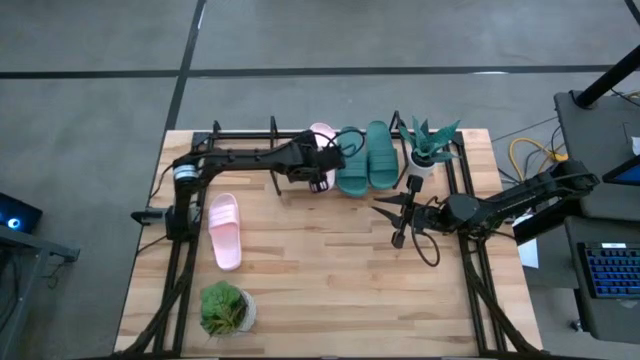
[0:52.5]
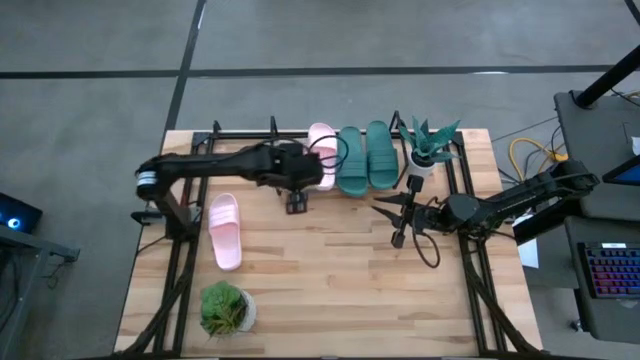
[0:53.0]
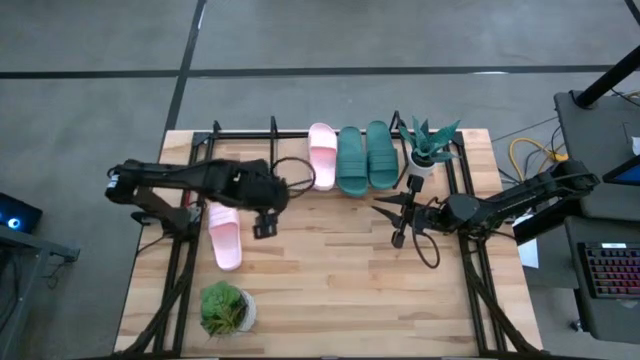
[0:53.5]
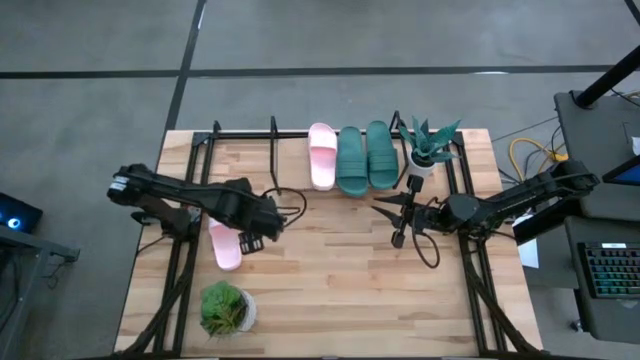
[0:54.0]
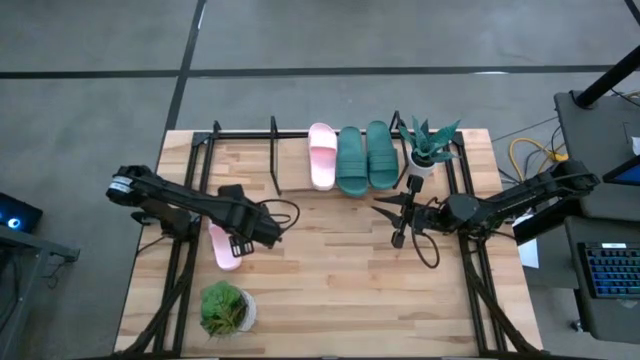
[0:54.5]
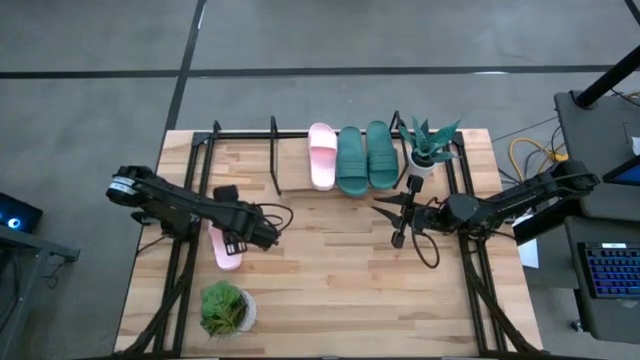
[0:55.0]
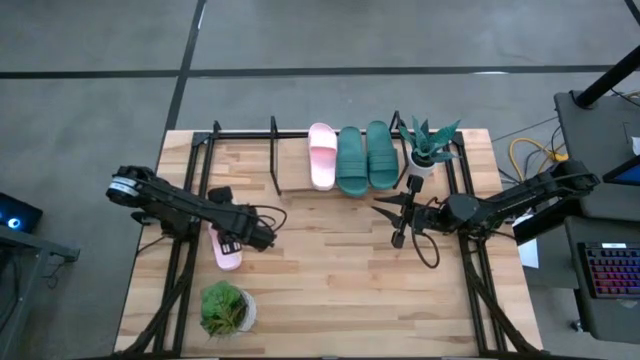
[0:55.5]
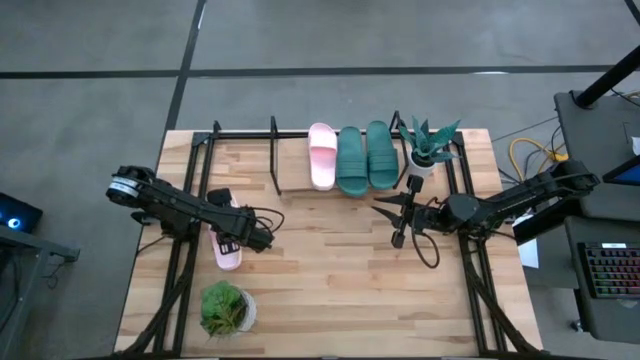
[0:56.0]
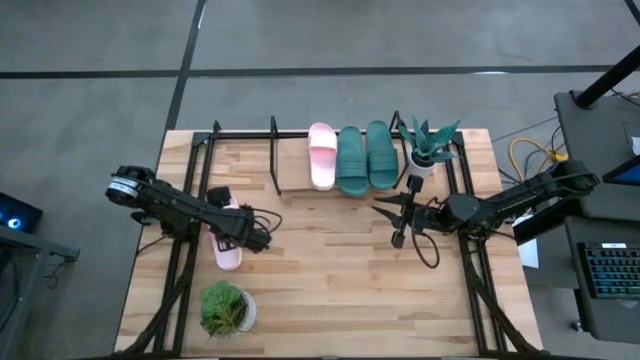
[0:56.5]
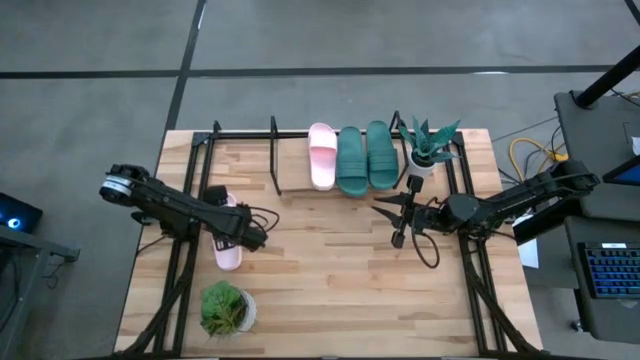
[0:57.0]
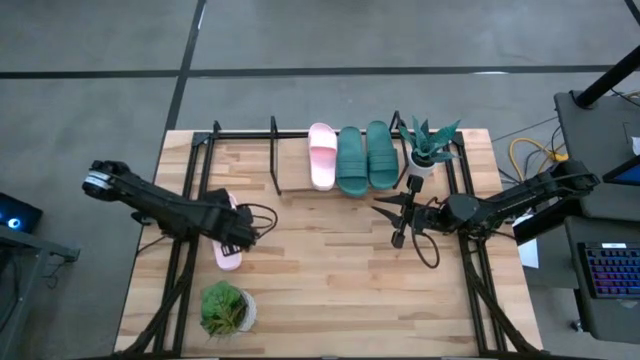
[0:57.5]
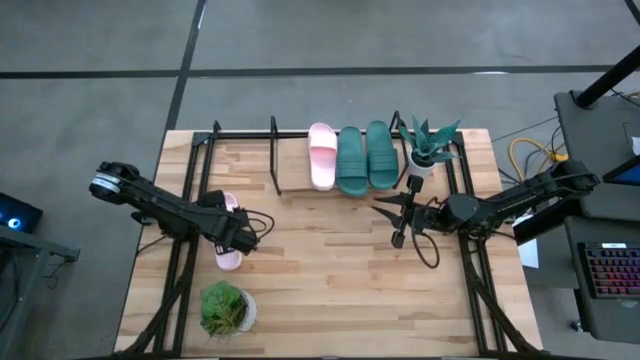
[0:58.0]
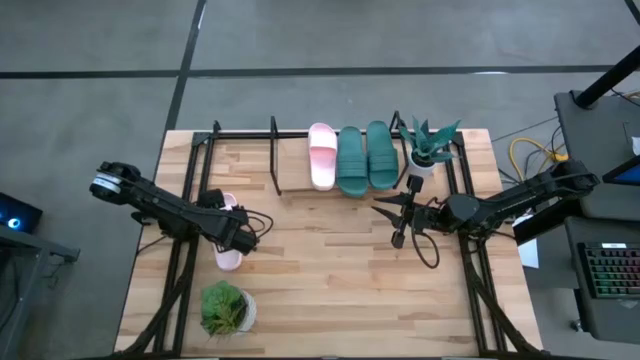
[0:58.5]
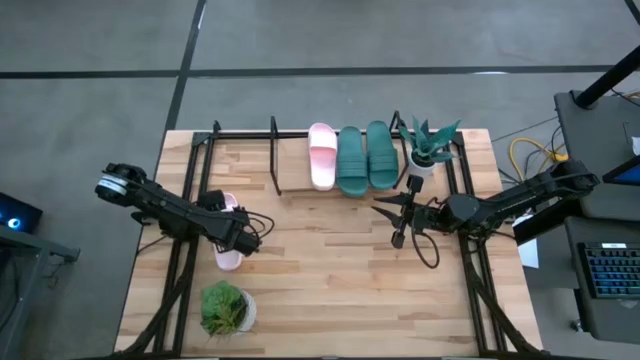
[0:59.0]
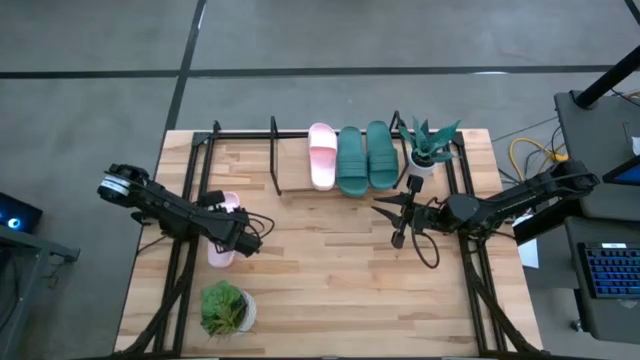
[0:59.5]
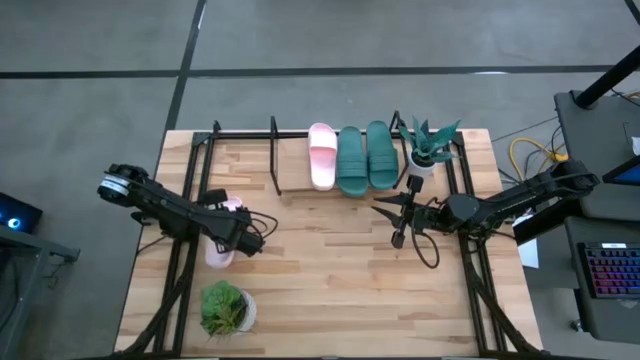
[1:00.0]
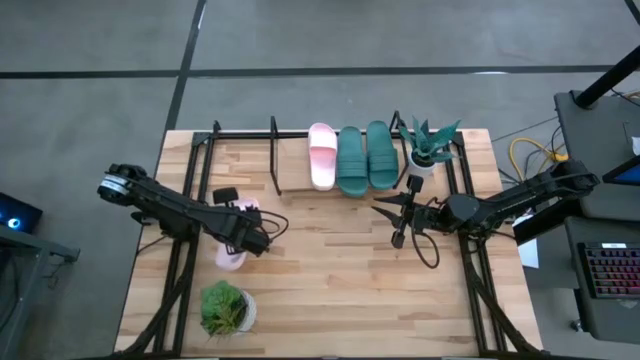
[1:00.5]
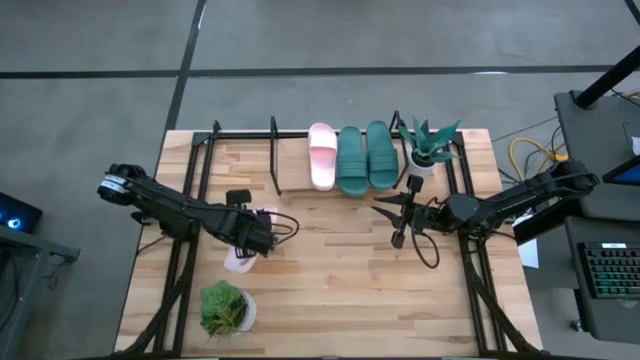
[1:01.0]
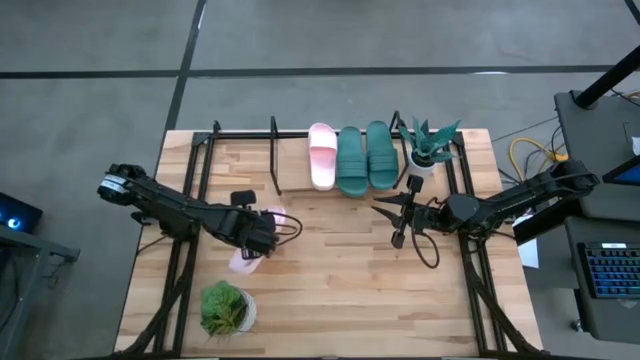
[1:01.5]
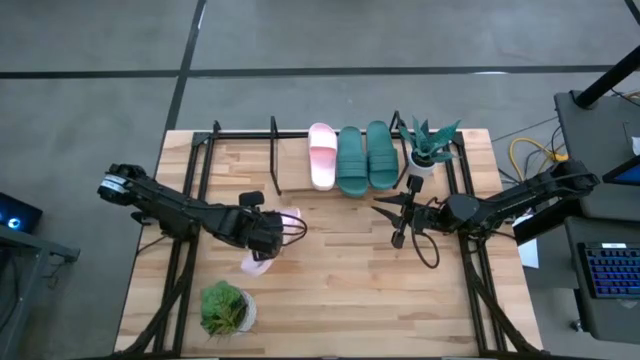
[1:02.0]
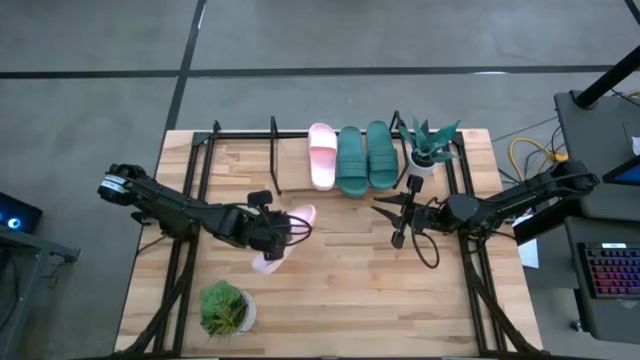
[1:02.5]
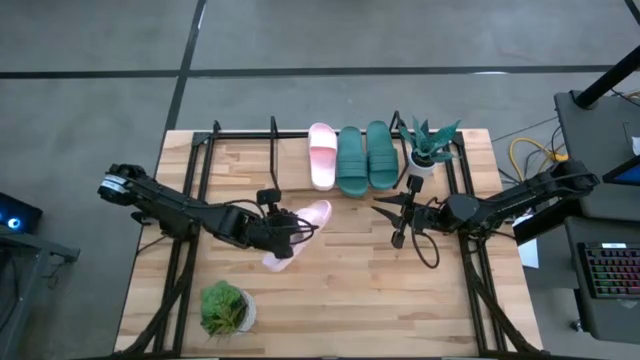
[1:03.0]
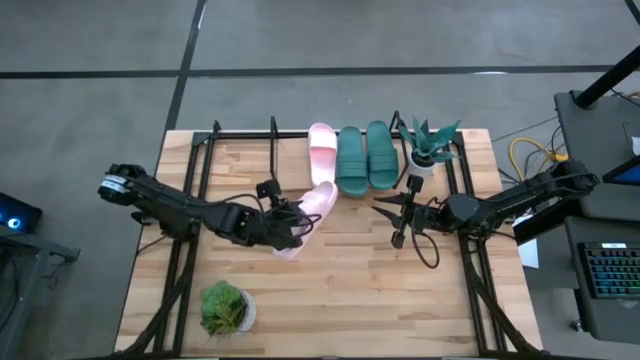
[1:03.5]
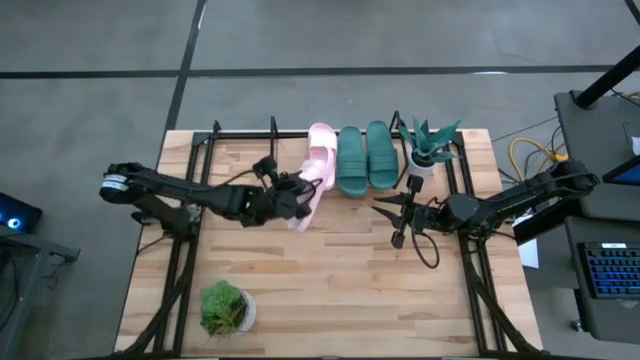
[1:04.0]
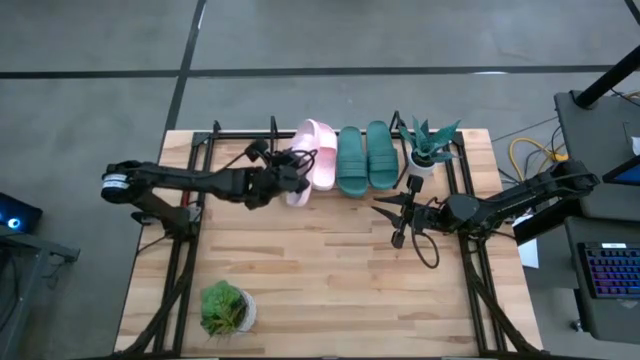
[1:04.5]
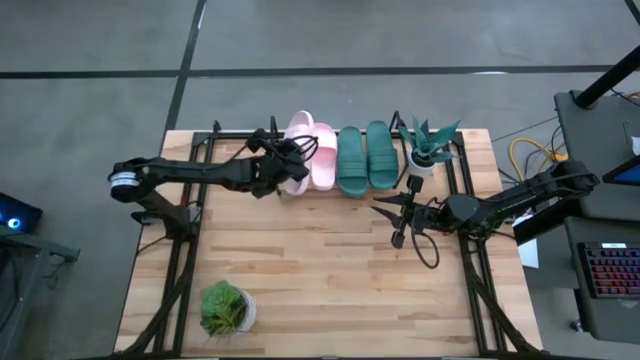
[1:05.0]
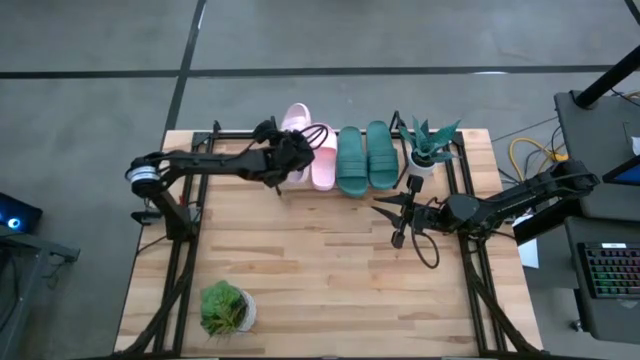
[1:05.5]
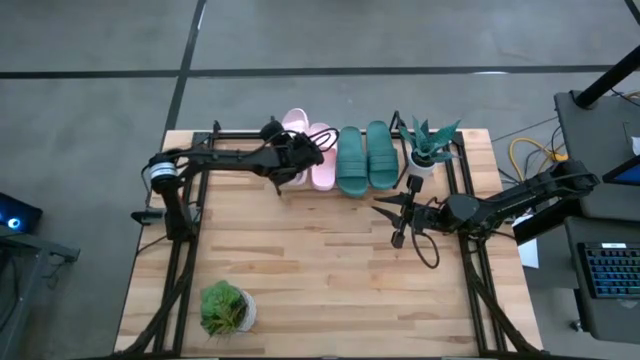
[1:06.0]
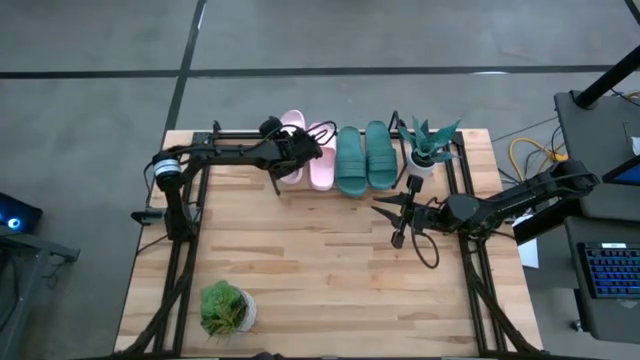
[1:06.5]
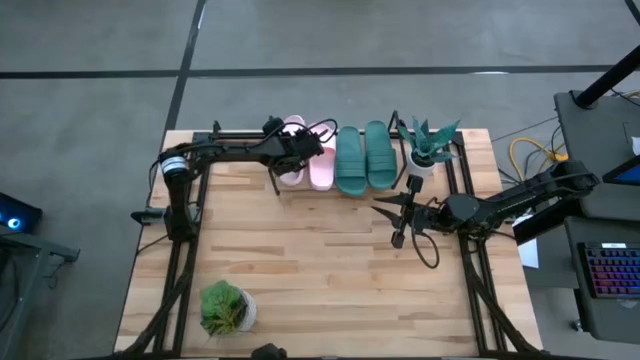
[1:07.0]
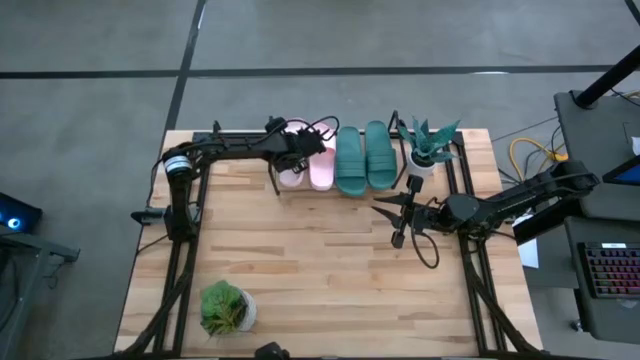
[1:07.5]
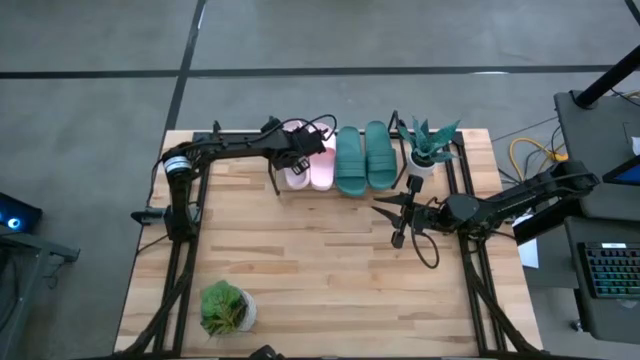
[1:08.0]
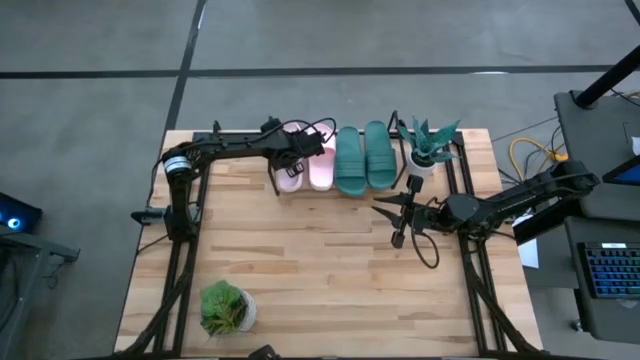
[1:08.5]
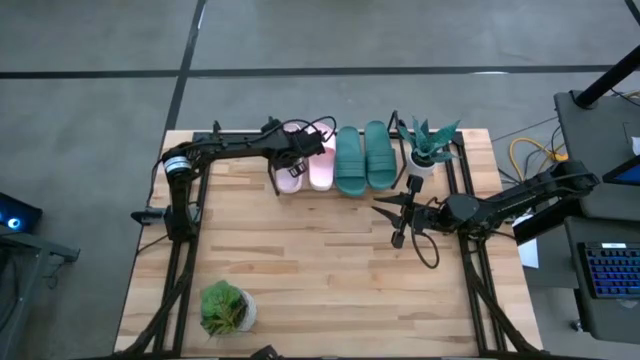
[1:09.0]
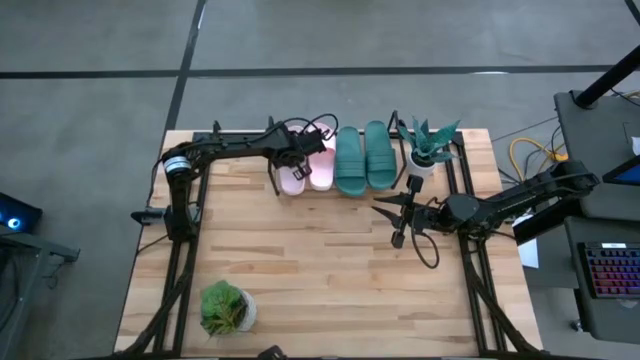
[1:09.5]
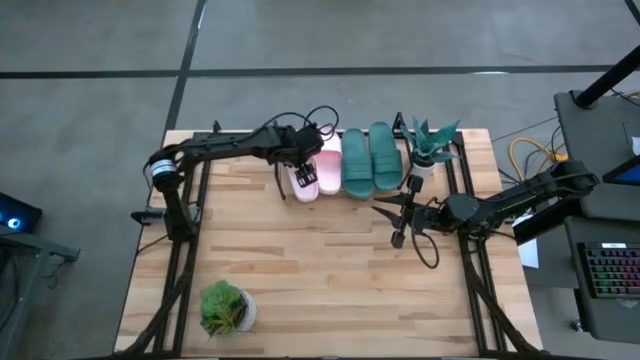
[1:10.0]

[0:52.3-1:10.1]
Task: Pick and place slides into the shelf
Put the pink slide on the shelf

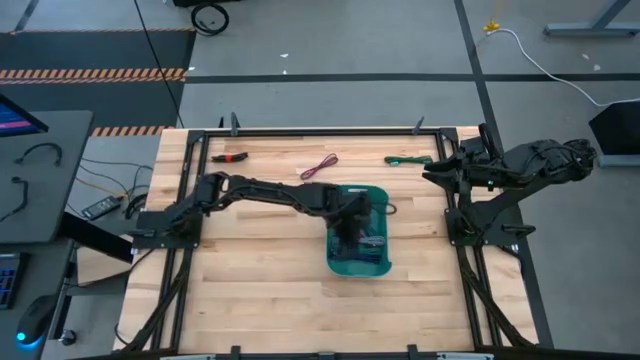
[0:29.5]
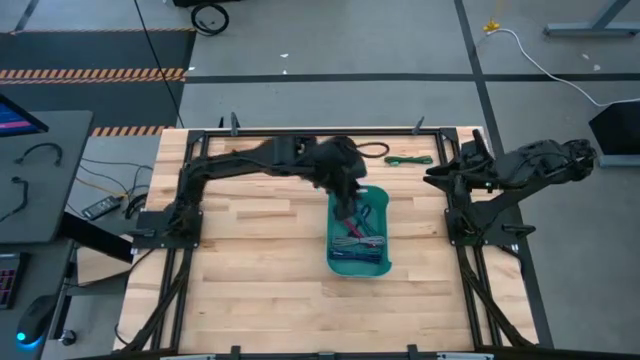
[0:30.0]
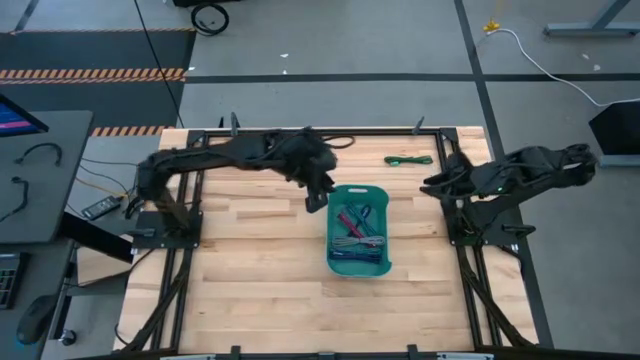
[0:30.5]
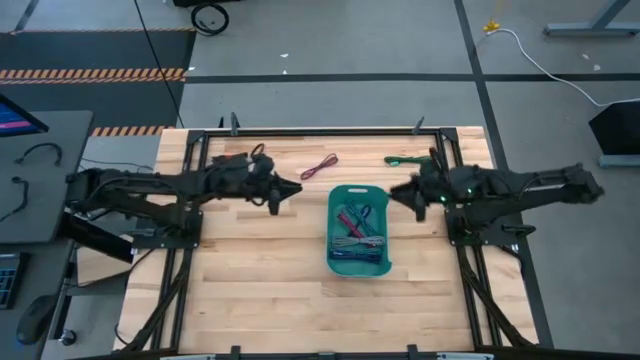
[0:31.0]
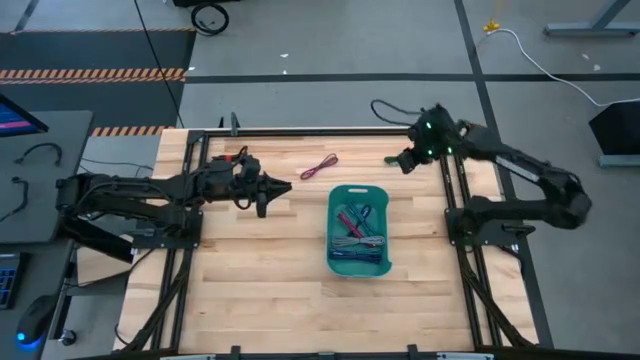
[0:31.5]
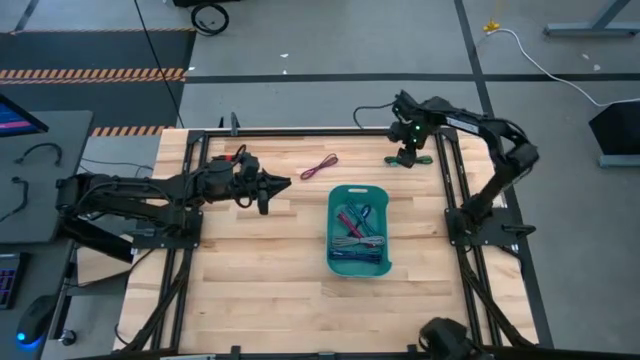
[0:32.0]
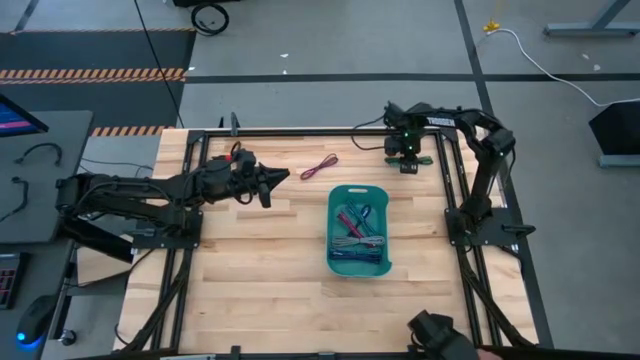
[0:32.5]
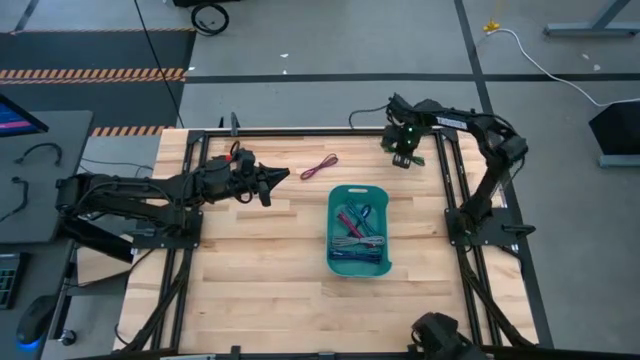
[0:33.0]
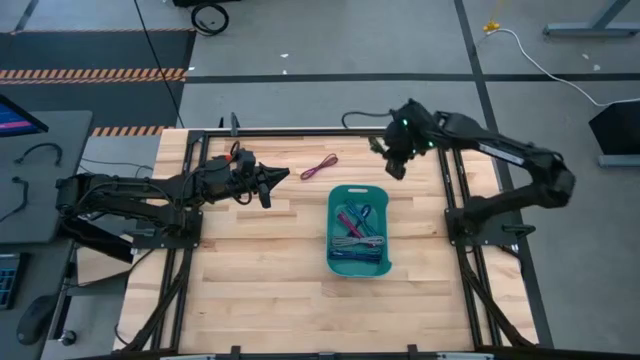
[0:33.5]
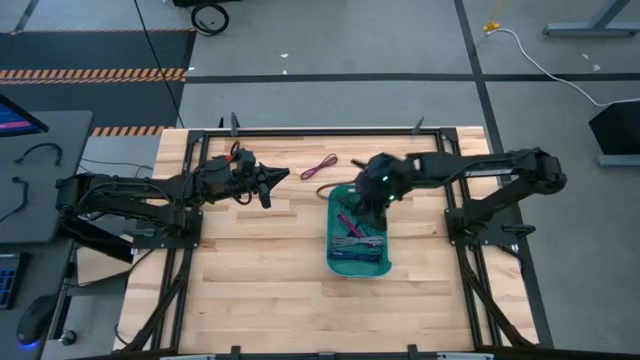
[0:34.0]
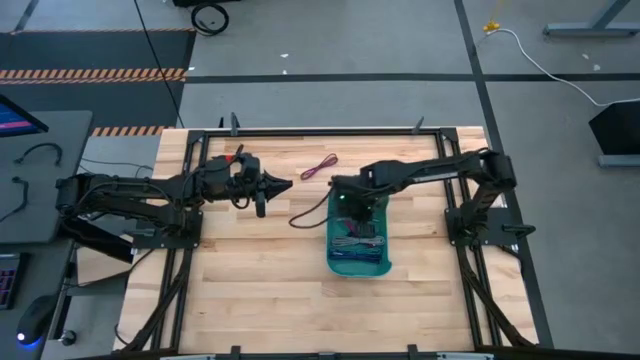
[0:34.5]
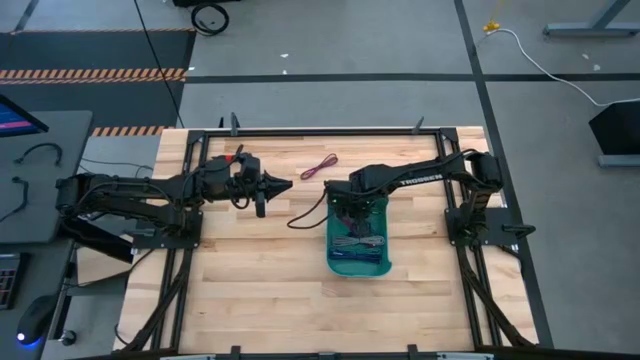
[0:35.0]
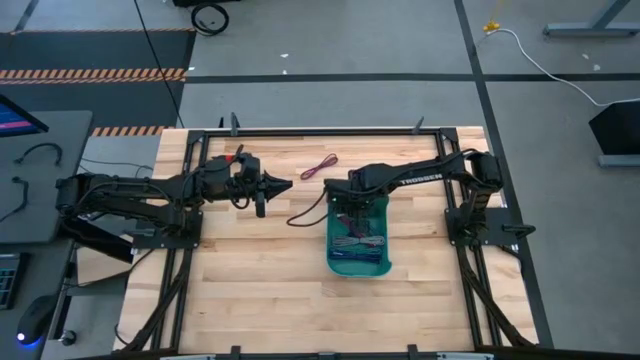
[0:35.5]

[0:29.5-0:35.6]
Task: Pick and place USB-C Cables
Put the green USB cable into the light green bin
